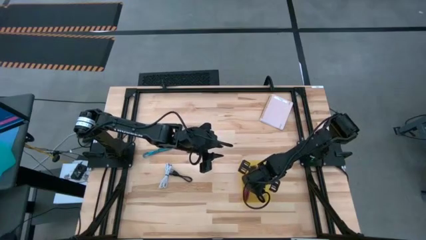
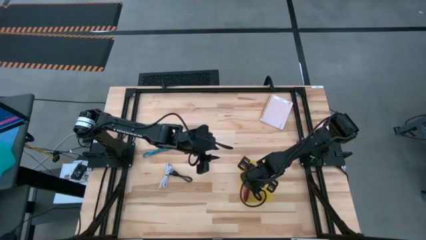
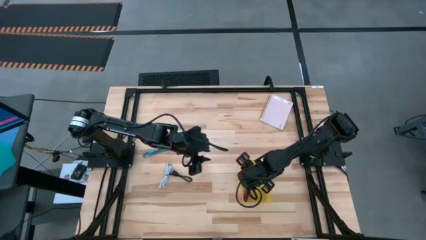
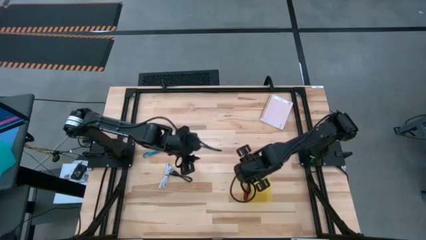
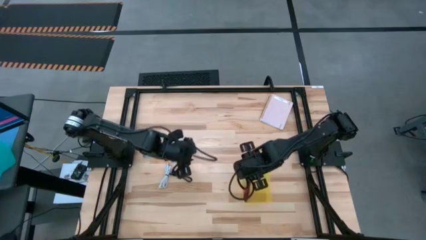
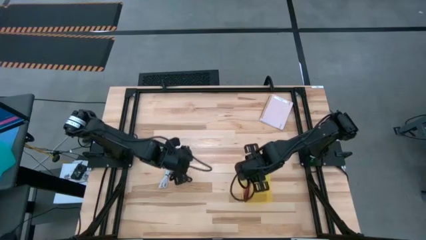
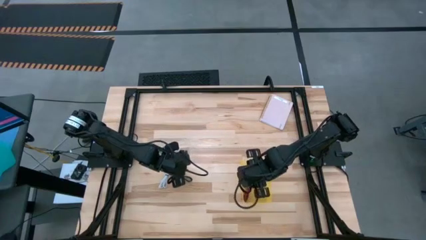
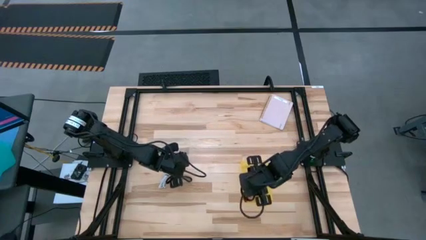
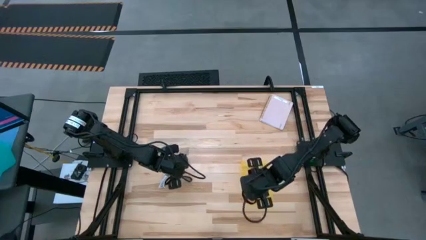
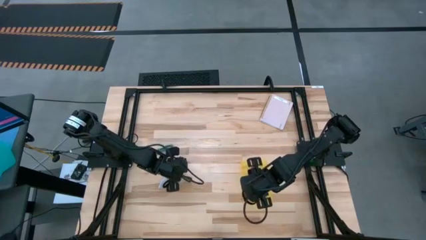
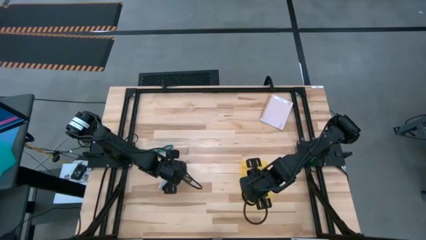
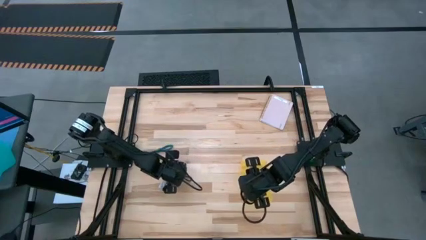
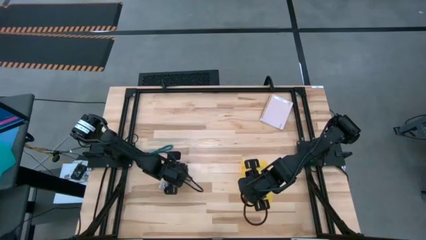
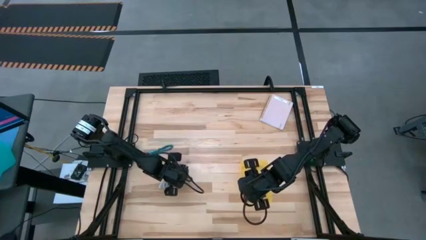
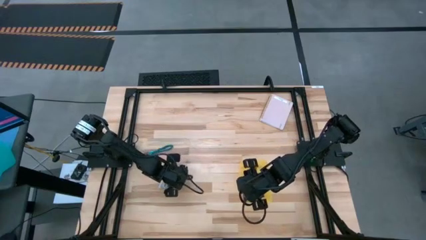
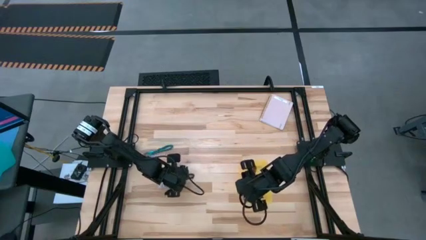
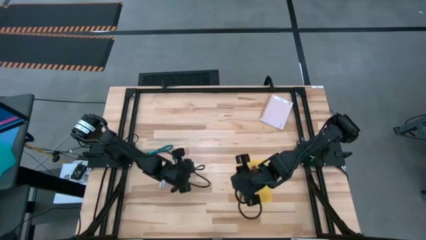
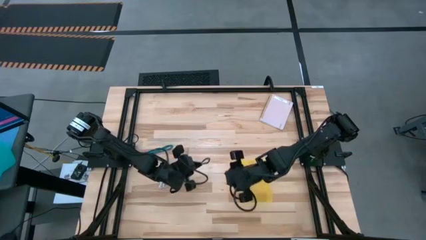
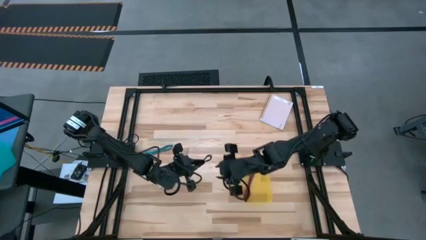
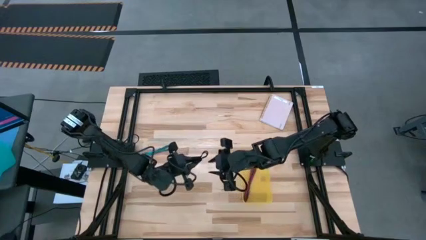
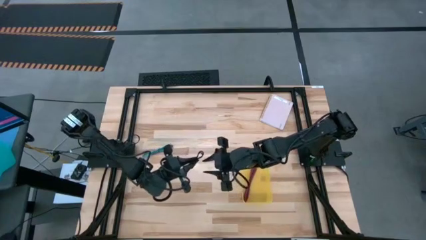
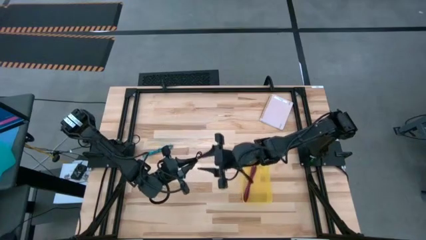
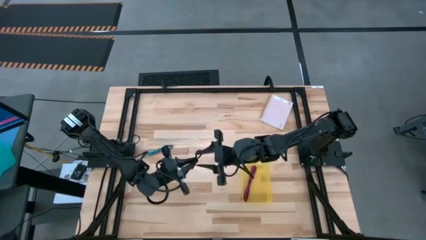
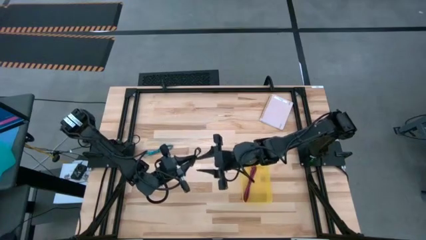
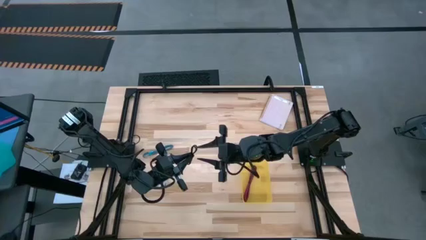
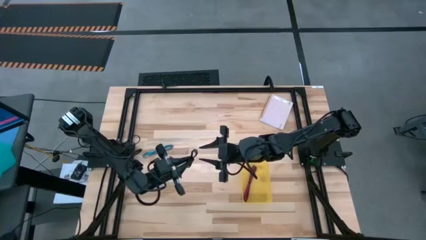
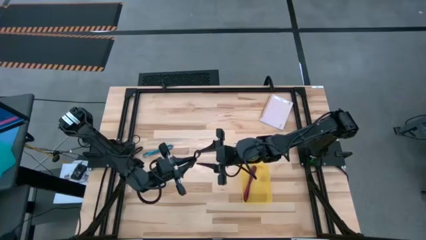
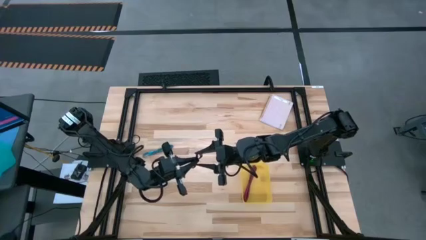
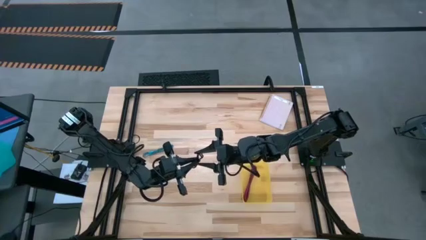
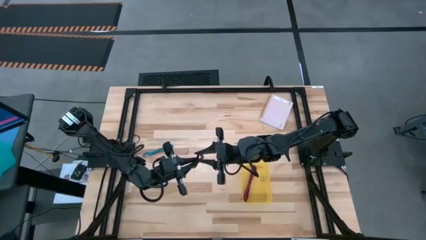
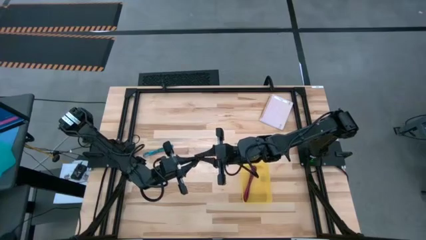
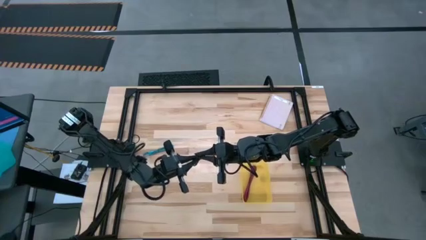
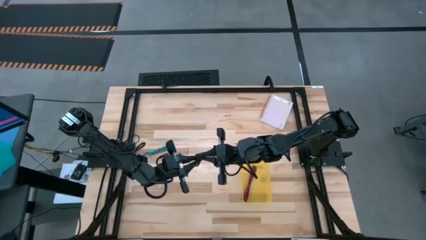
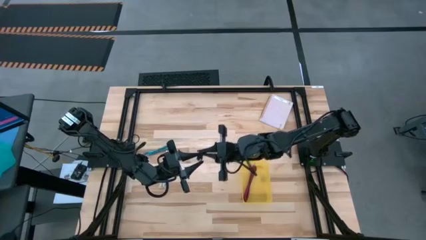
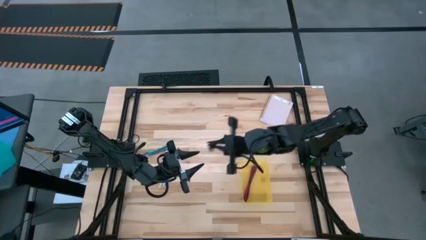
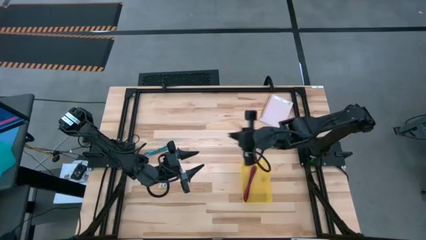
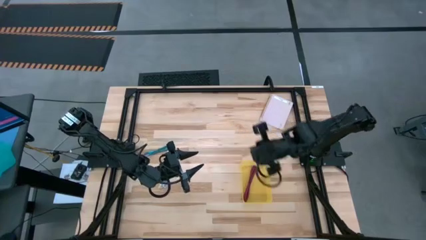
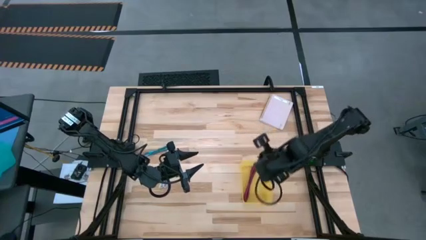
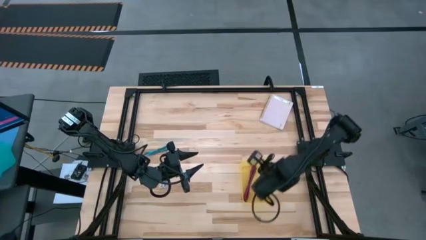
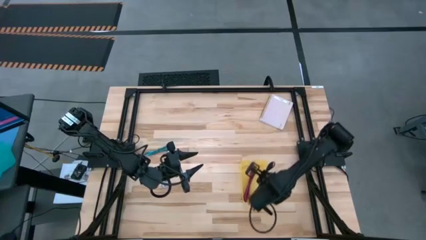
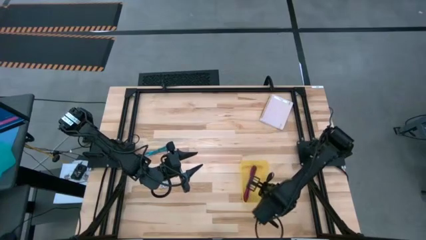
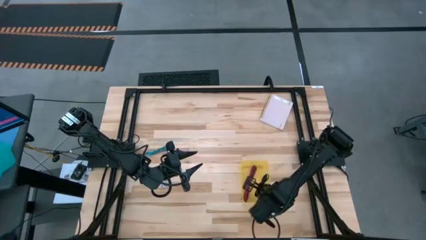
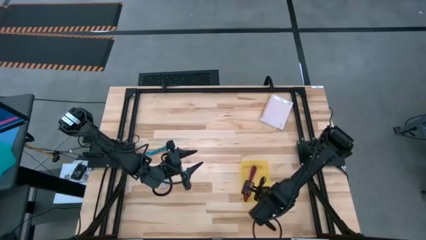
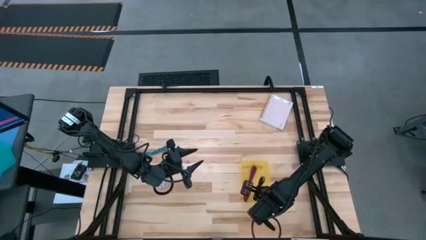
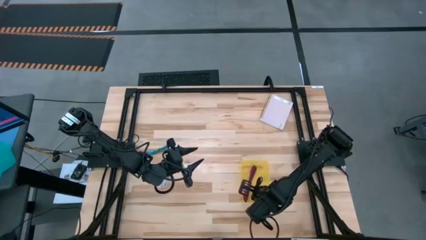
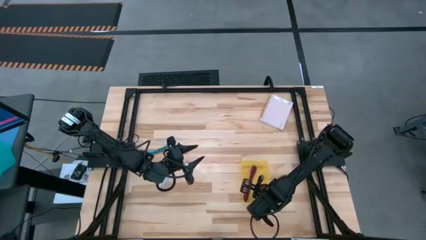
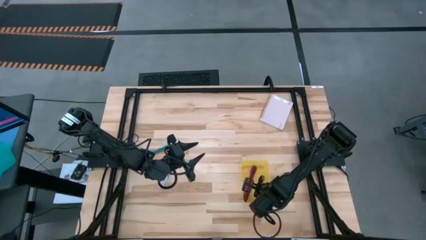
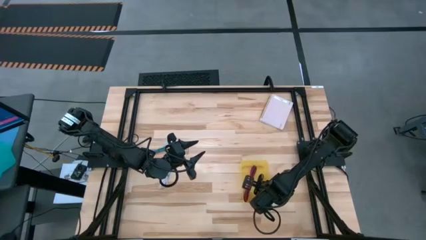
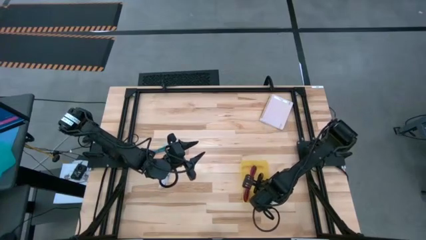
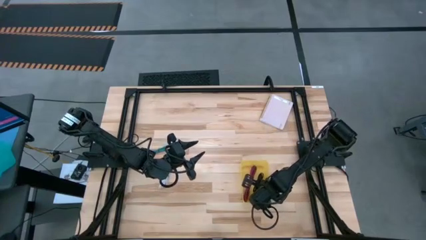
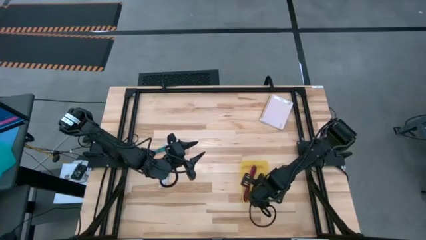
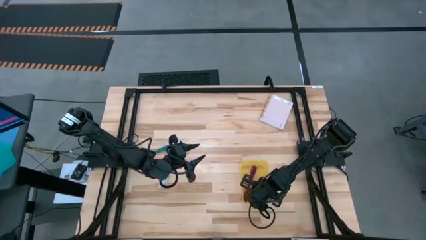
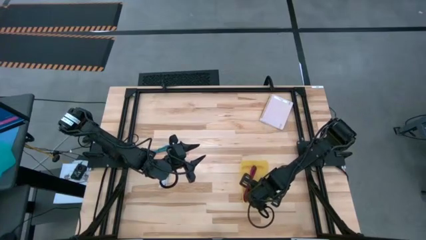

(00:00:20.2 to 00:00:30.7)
Task: Pick and place USB-C Cables
Put the black charger cable into the yellow bin

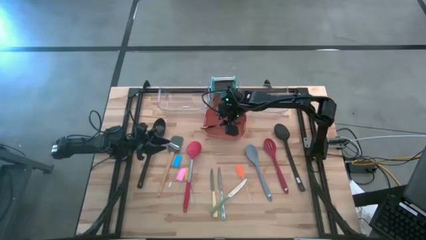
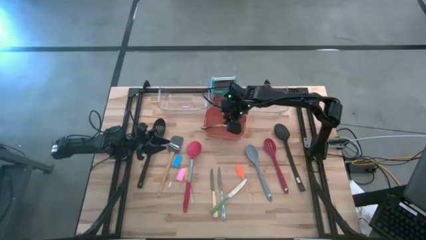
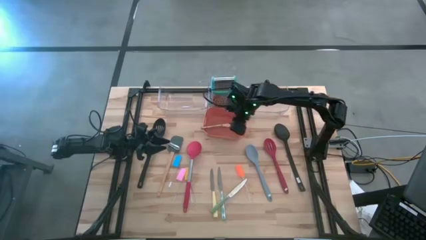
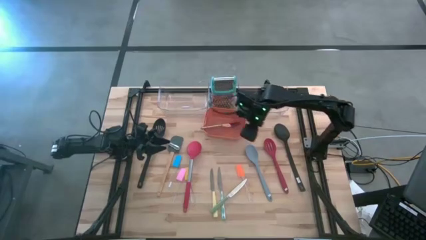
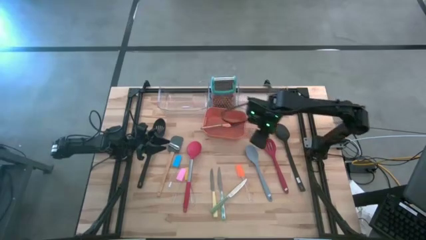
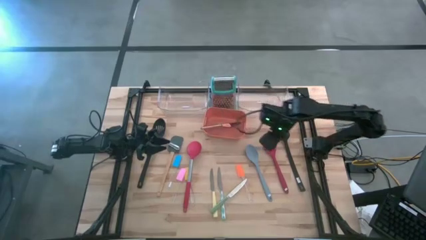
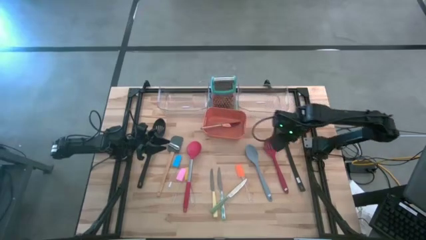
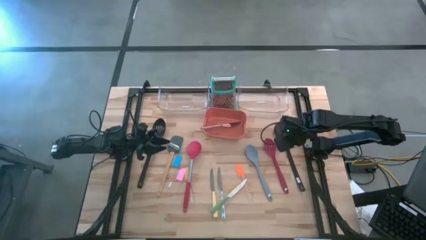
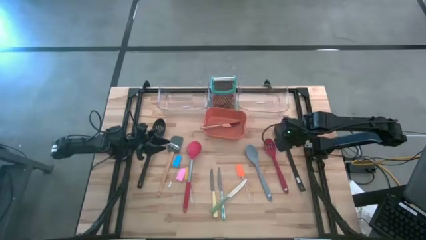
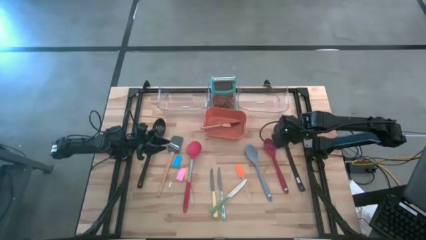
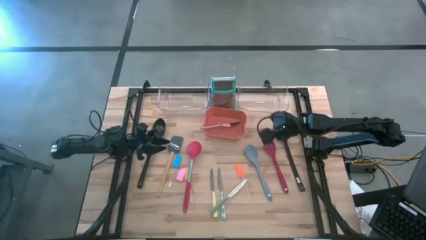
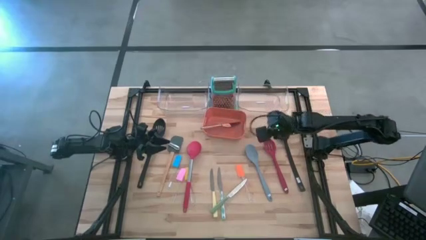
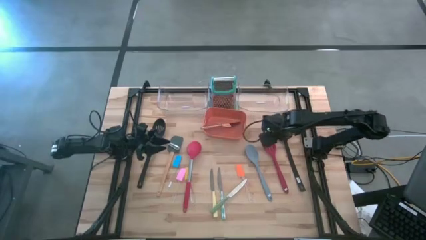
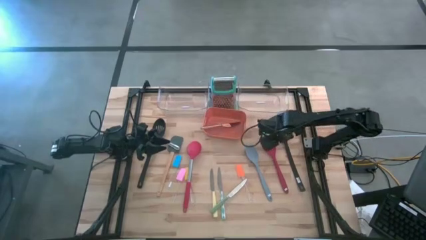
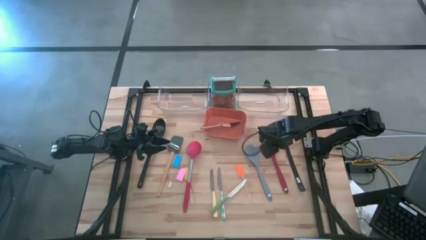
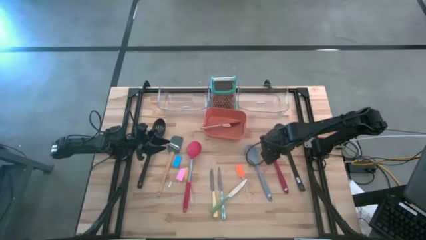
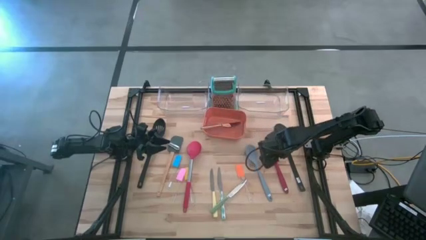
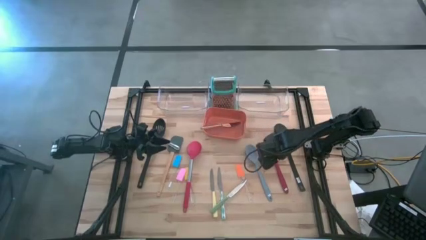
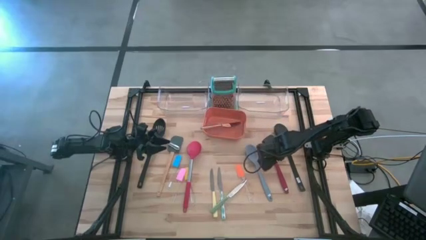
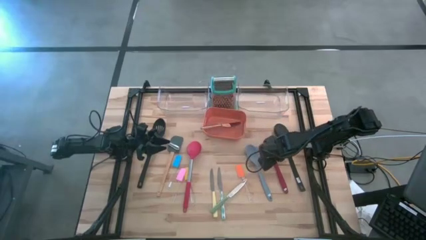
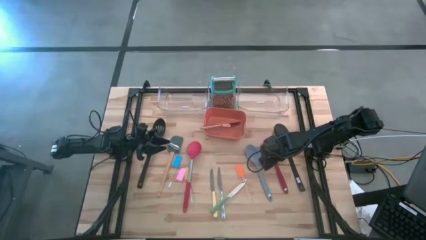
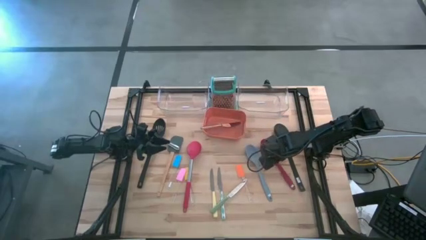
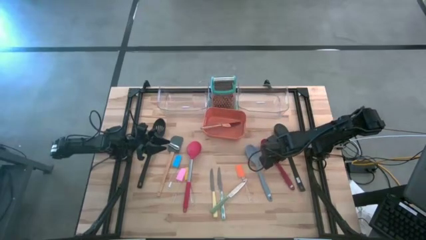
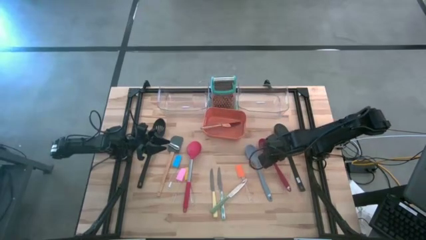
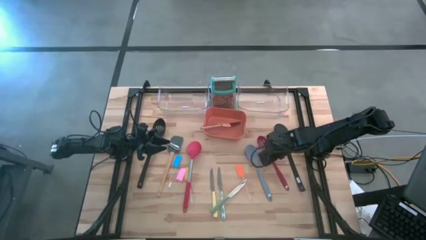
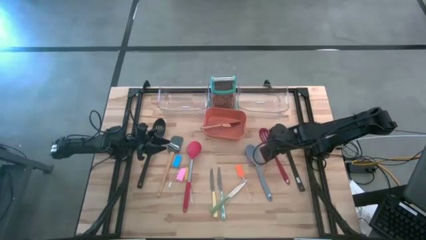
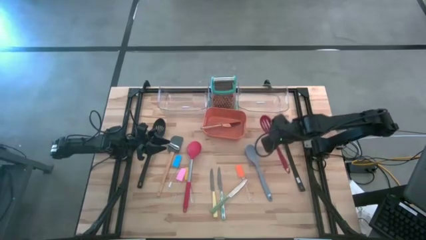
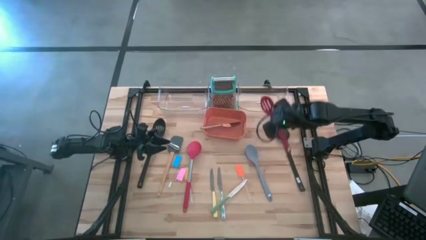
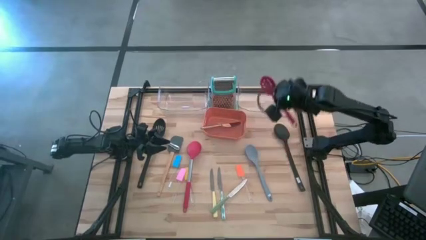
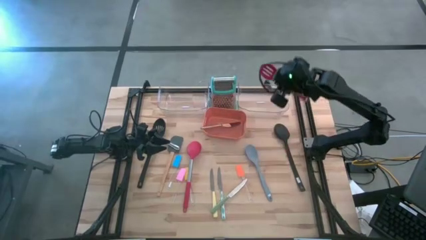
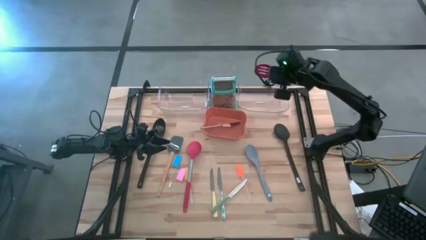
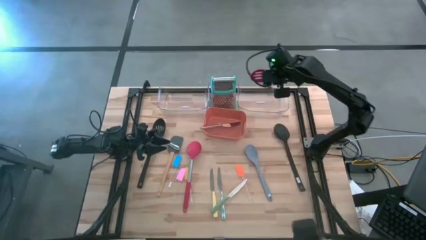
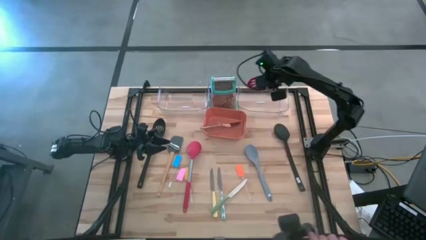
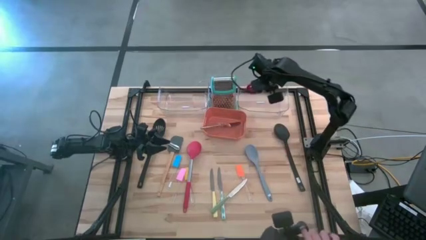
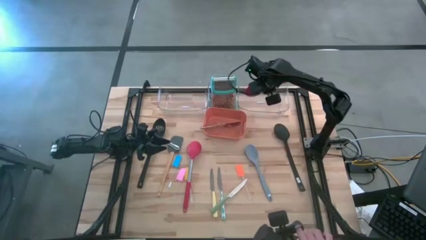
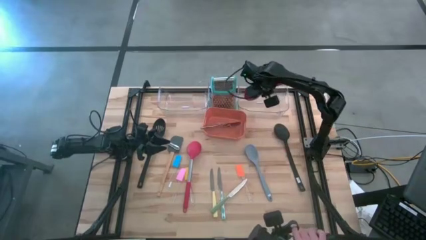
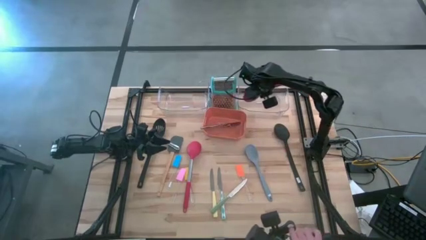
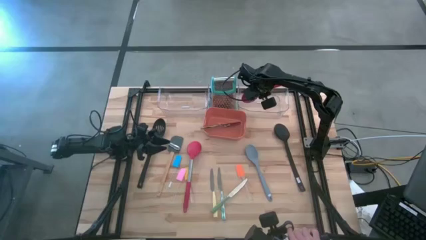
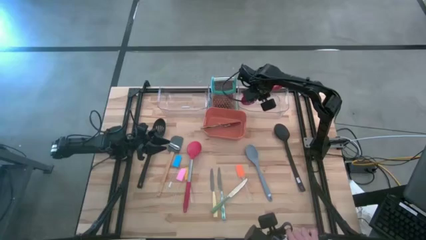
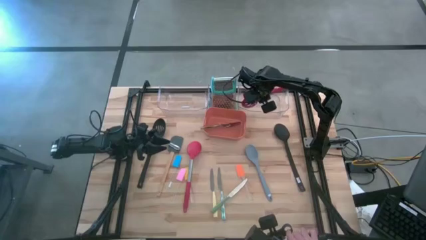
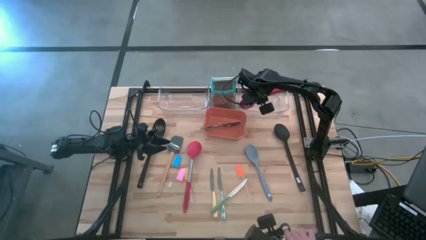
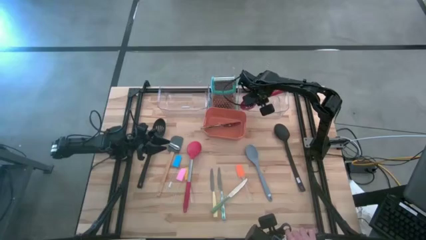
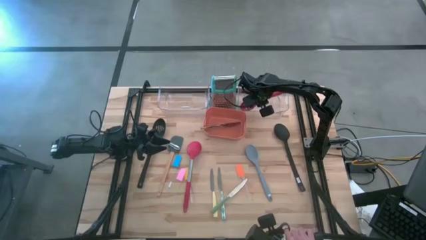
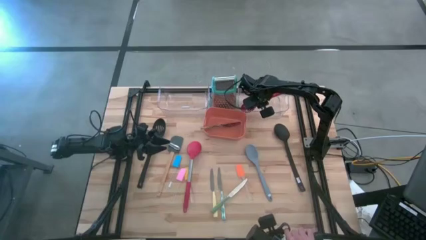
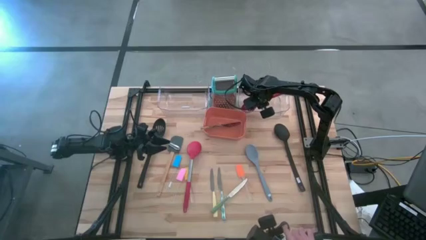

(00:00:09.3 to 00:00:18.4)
Task: Pick & Place Kitchen Items
Put the right red serving spoon into the right transparent bin
